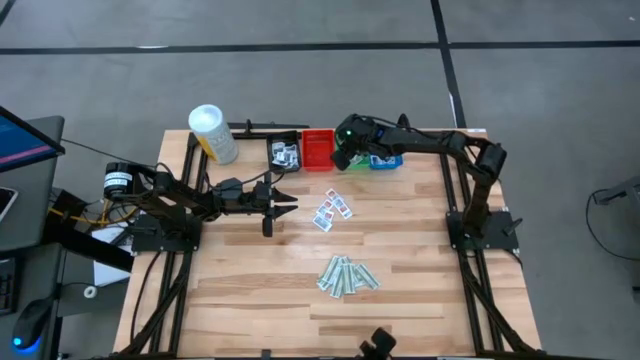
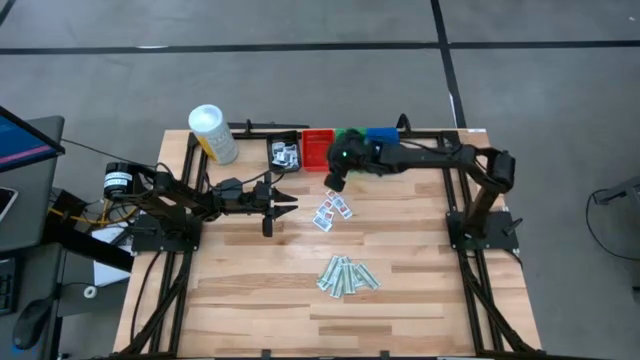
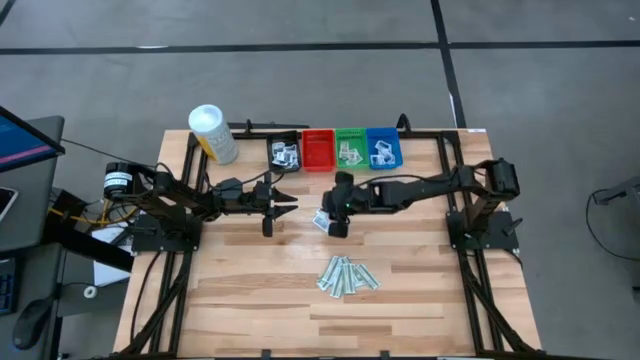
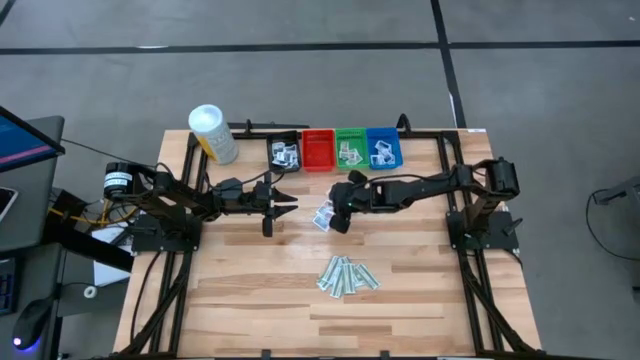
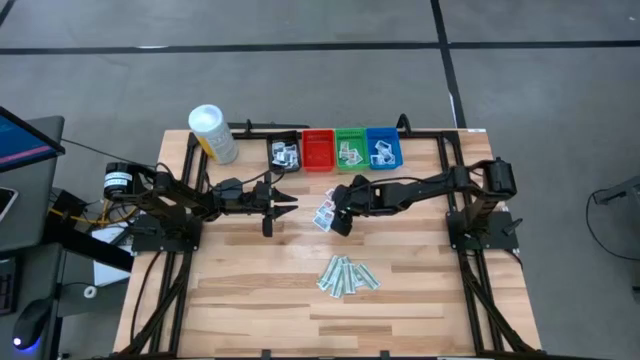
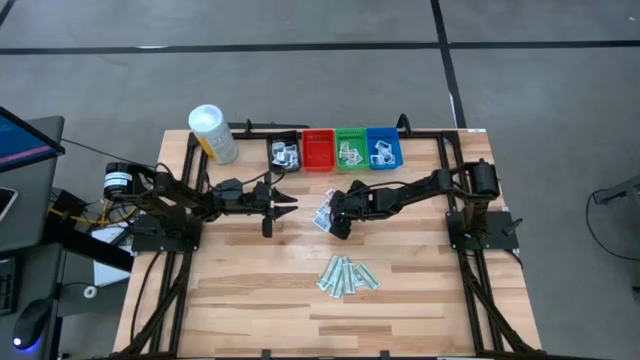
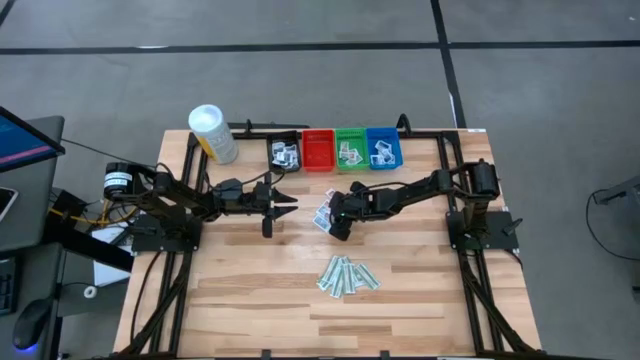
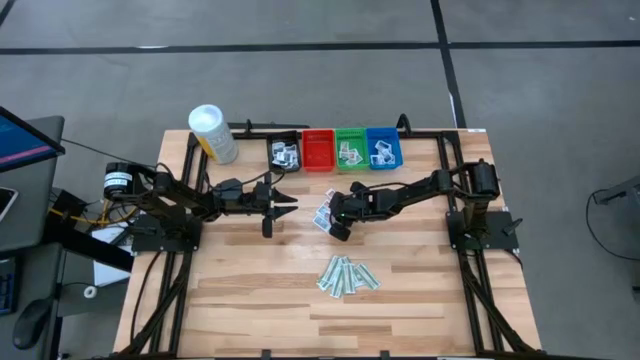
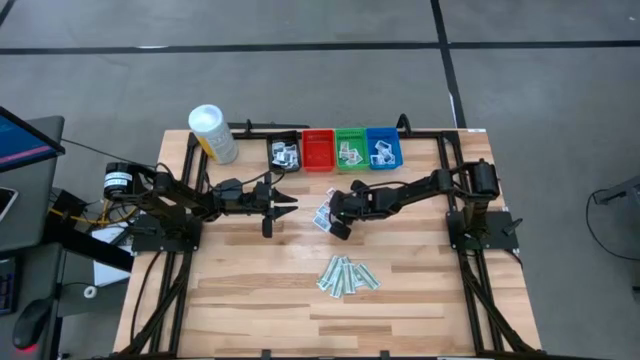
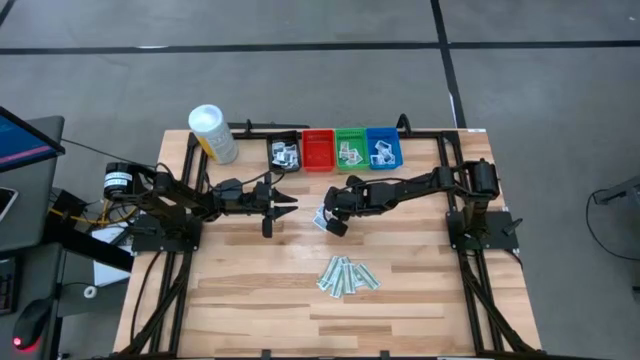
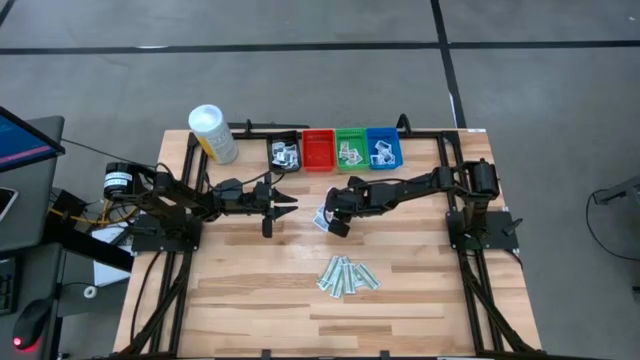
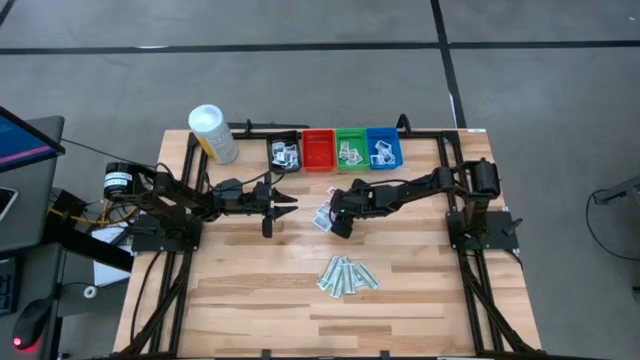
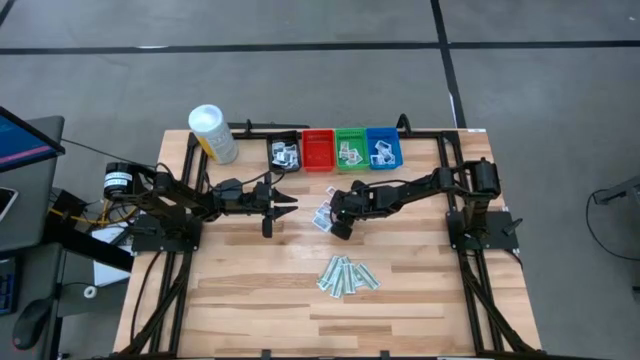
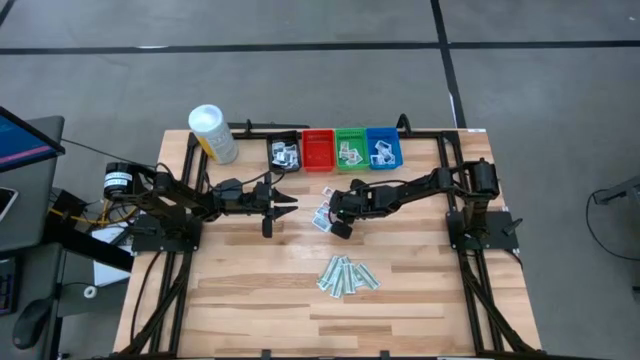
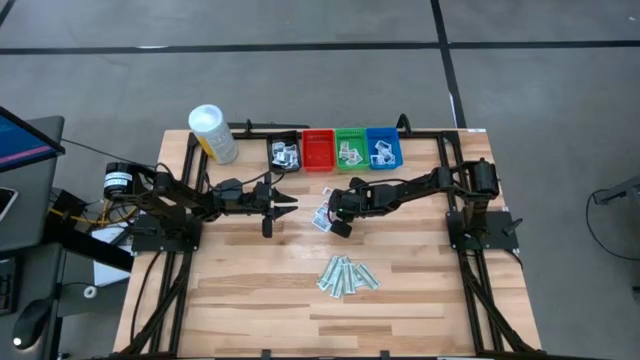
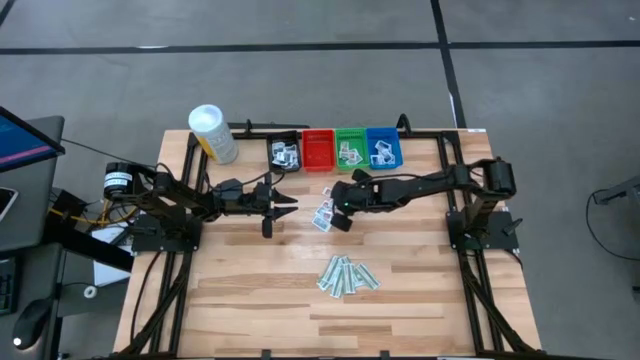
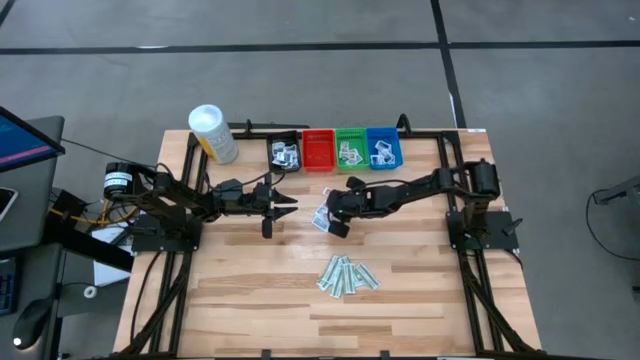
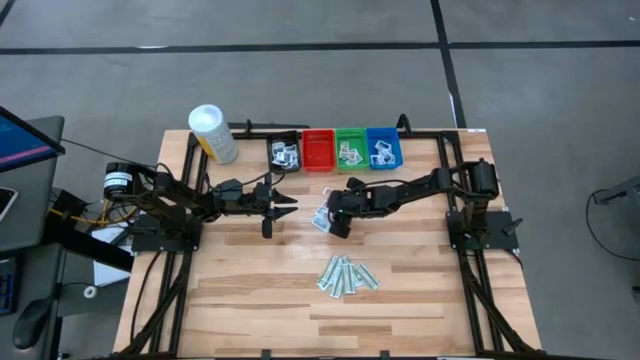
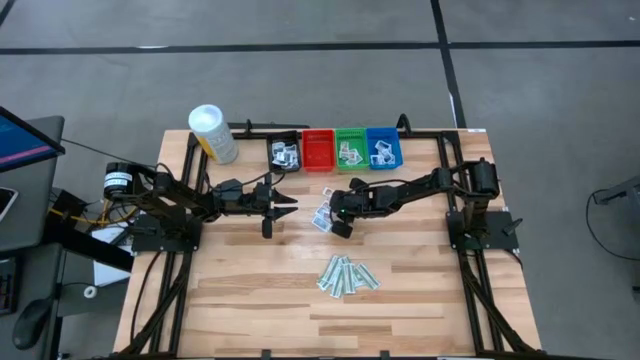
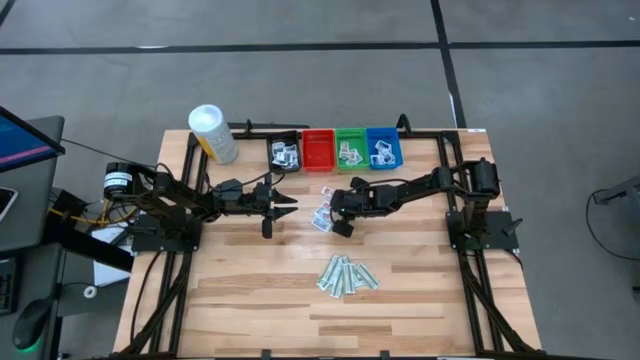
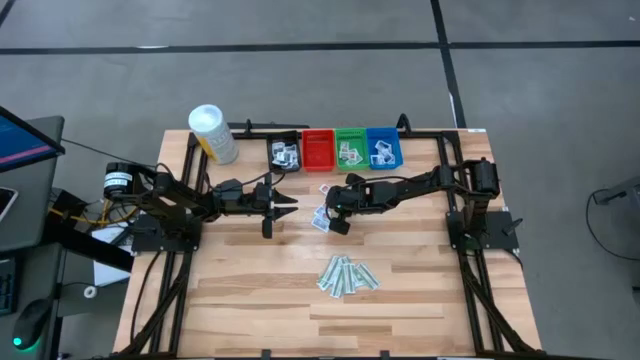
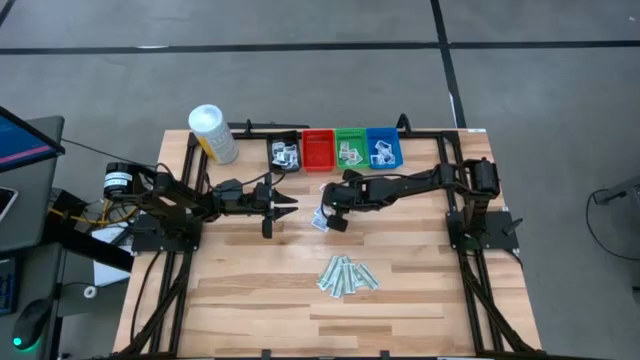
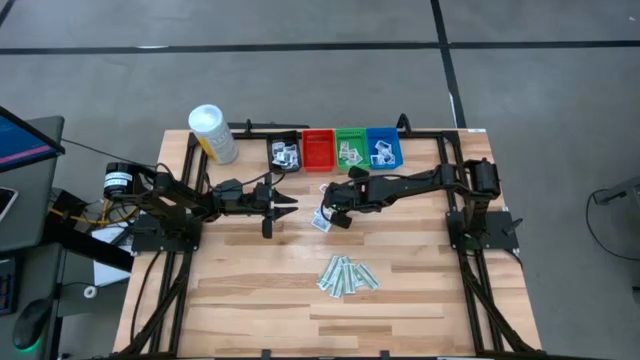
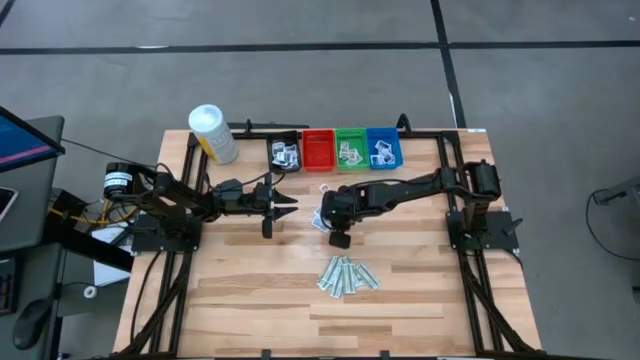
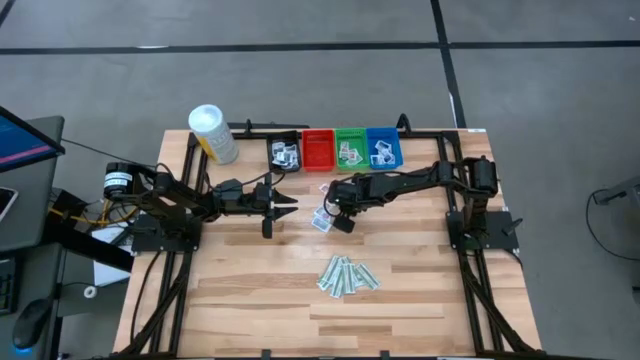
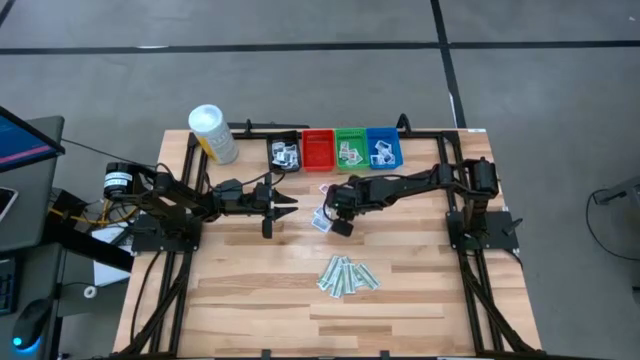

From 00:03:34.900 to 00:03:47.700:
Task: Pick & Place First Aid Supplies
Put the orange ointment pack into the green bin

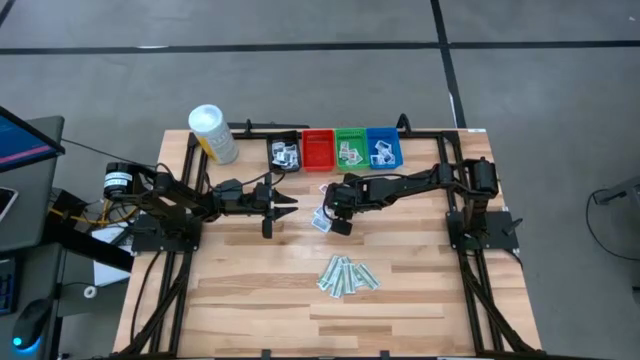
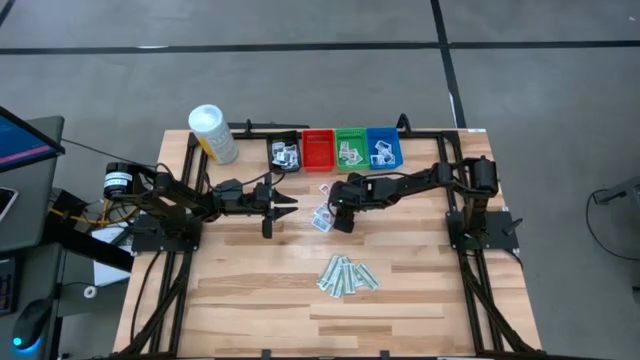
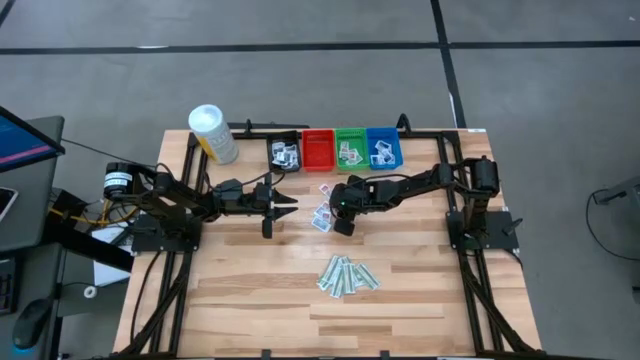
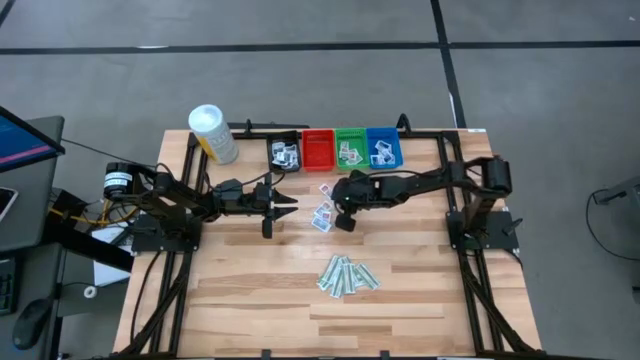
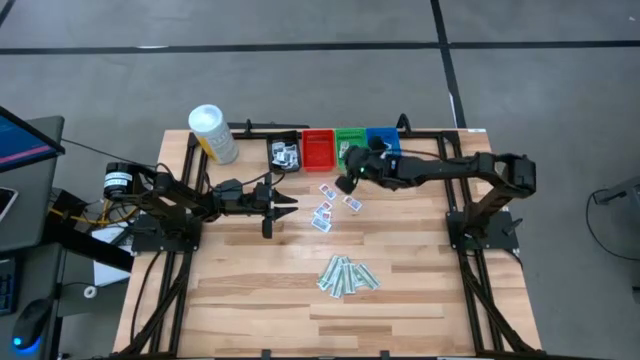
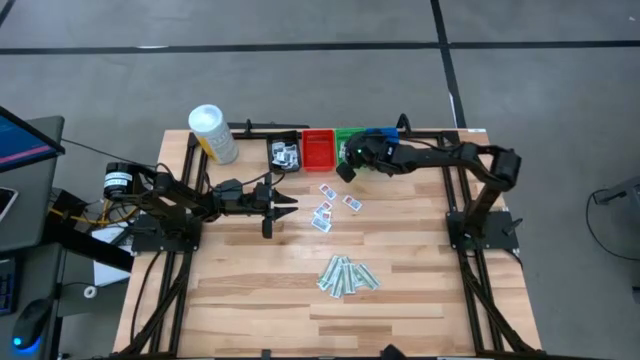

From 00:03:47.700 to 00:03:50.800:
Put the orange ointment pack into the green bin

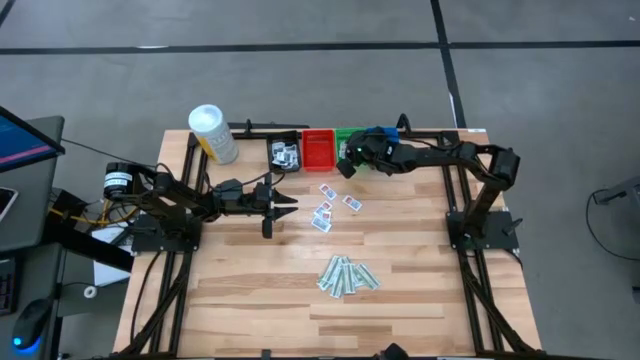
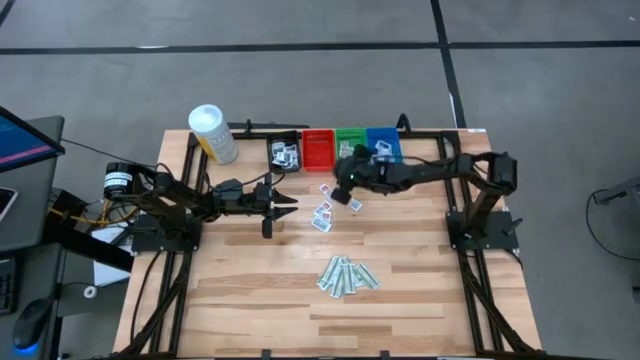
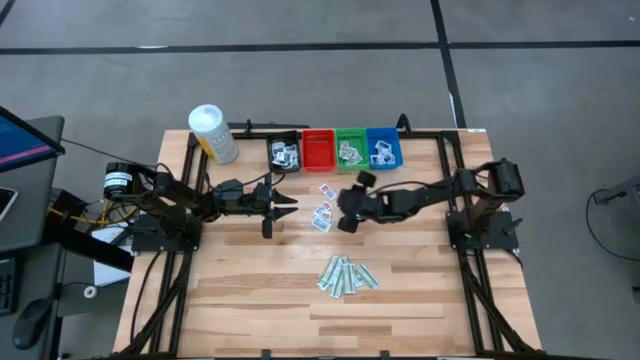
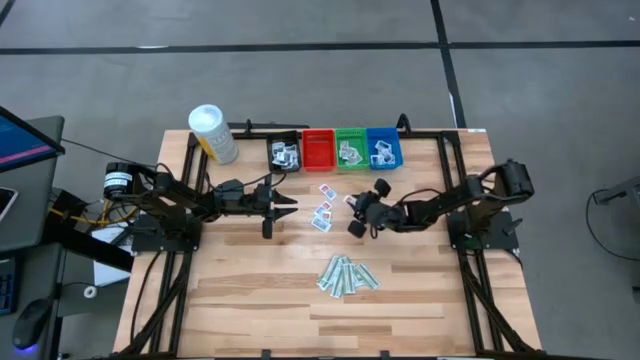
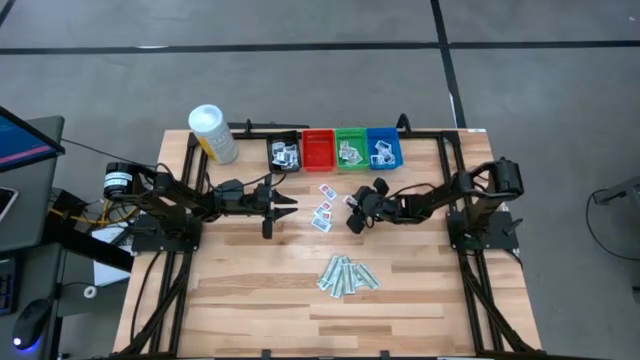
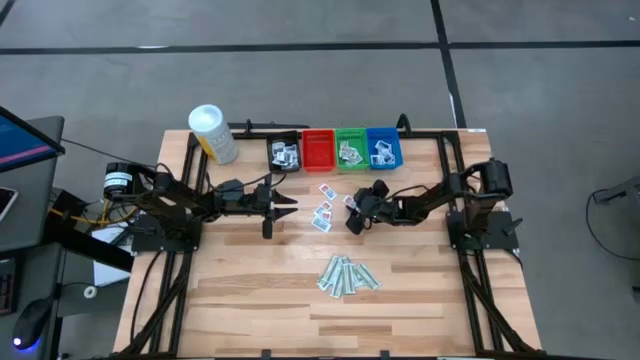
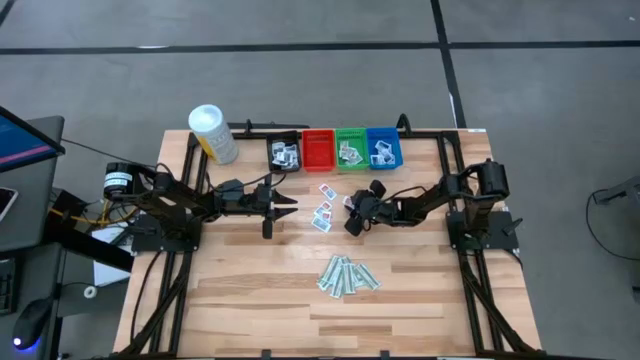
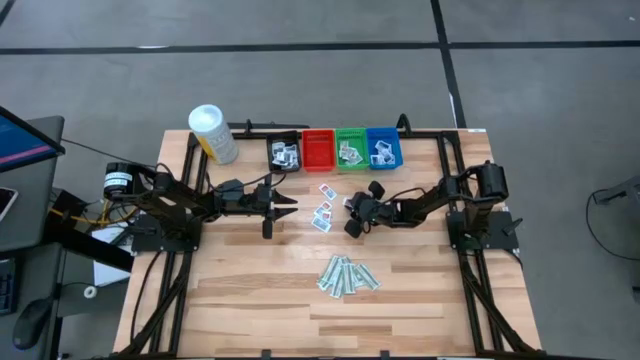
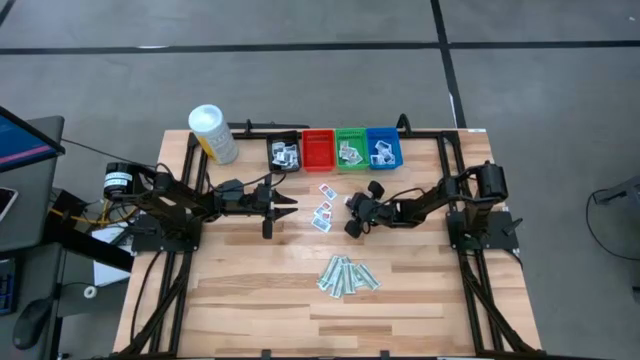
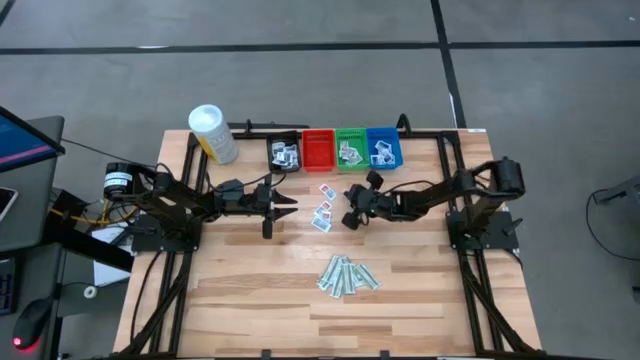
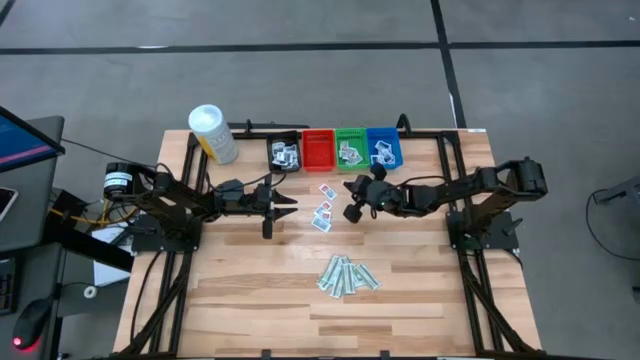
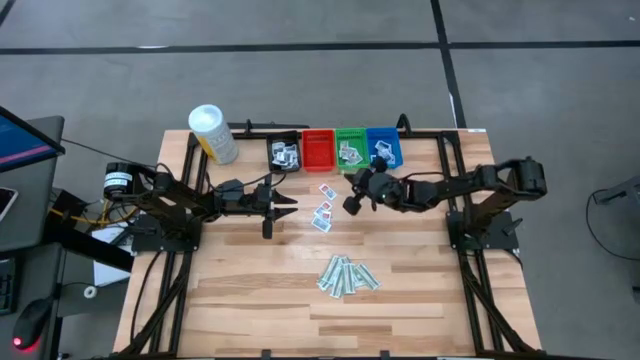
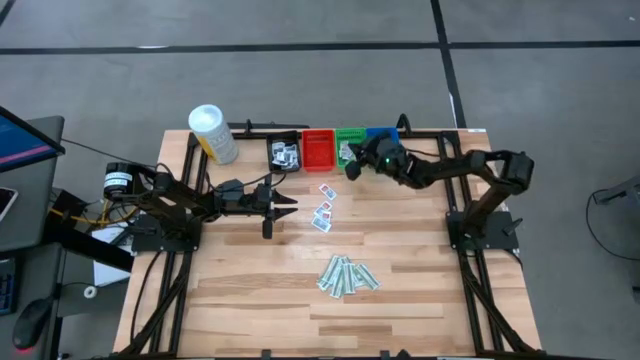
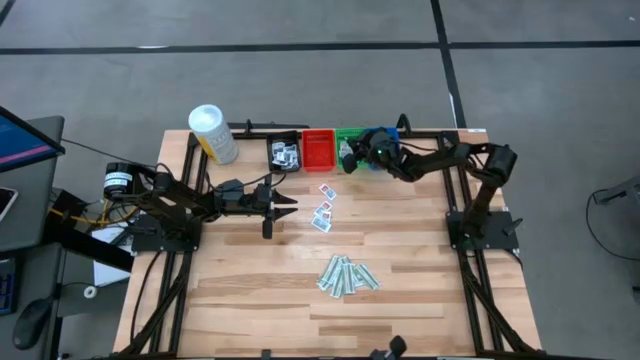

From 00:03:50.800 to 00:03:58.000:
Put the orange ointment pack into the green bin

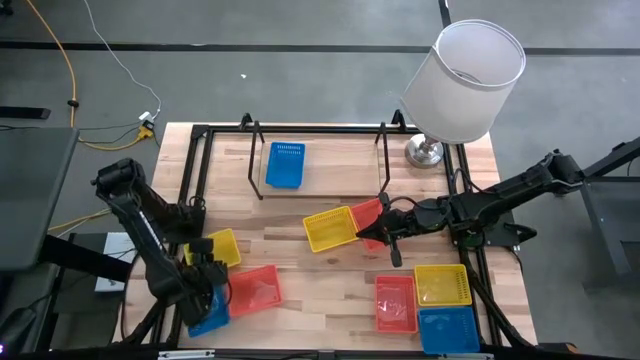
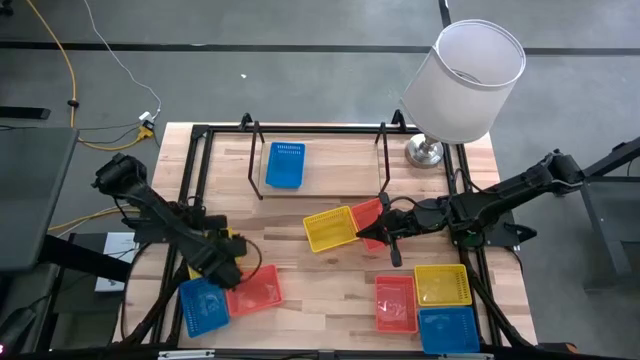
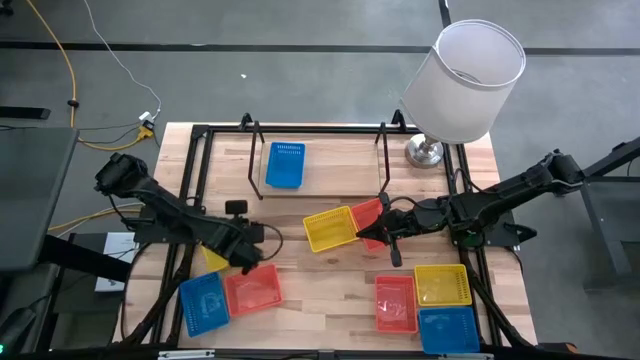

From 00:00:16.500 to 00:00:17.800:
Task: Stack baskets on shelf by color
Adjust the bottom left yellow bin
